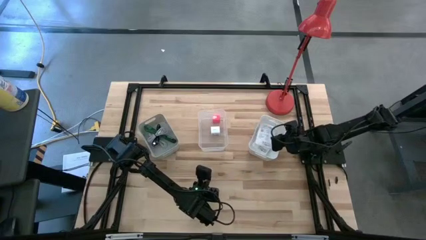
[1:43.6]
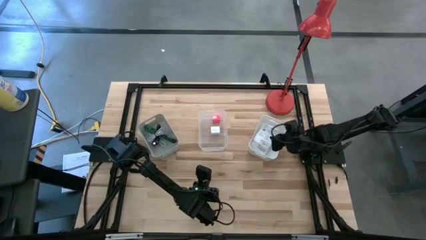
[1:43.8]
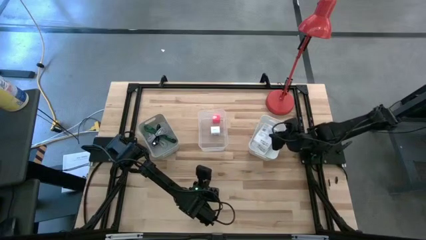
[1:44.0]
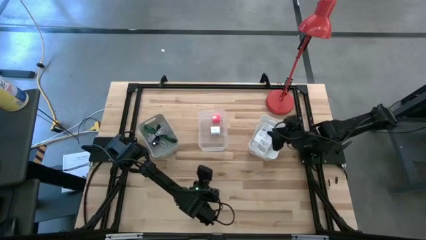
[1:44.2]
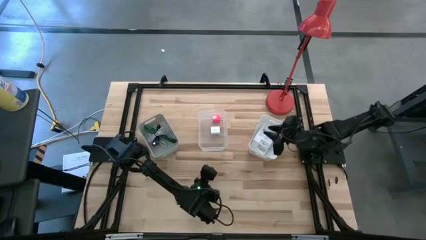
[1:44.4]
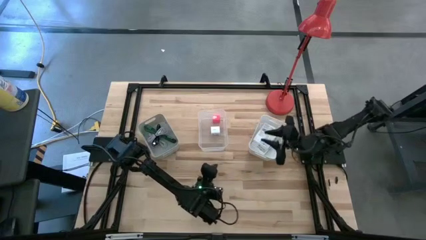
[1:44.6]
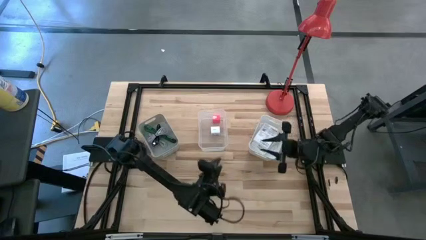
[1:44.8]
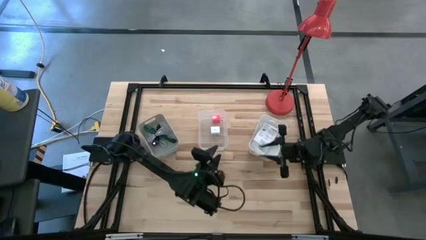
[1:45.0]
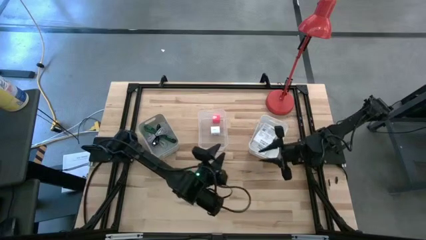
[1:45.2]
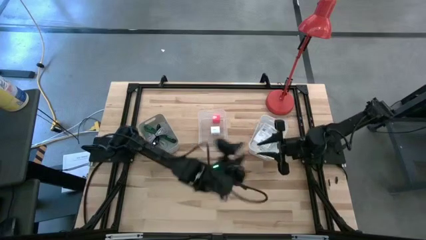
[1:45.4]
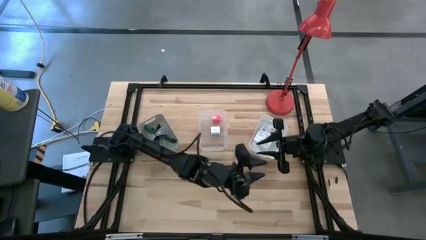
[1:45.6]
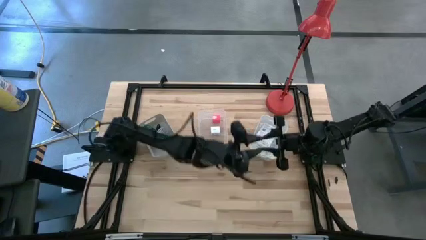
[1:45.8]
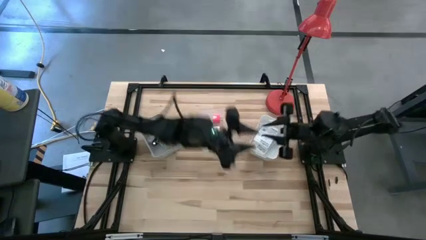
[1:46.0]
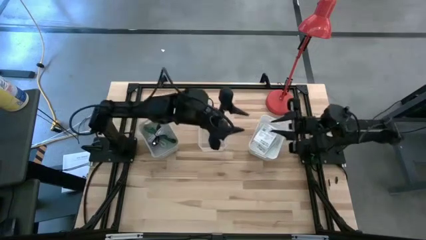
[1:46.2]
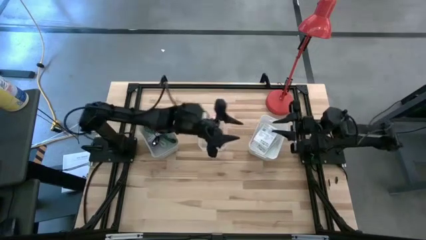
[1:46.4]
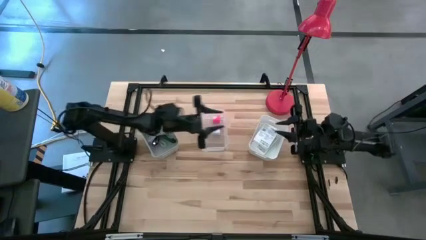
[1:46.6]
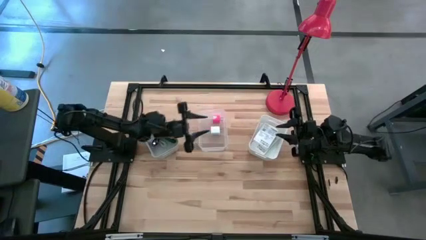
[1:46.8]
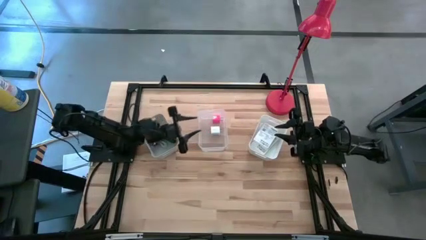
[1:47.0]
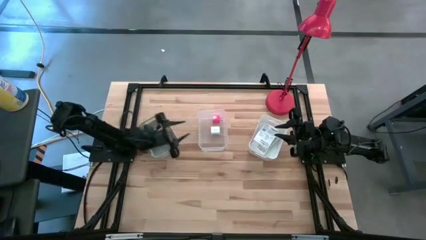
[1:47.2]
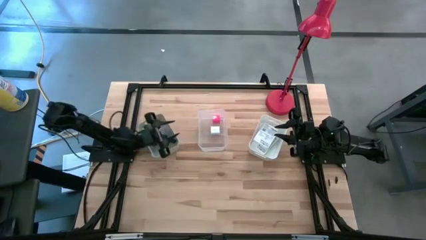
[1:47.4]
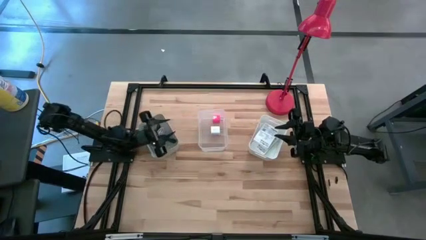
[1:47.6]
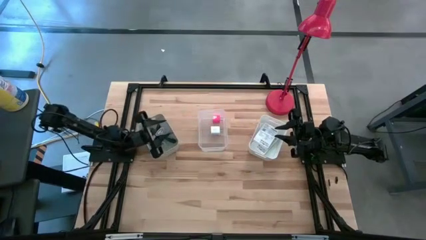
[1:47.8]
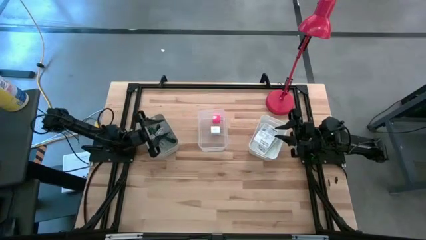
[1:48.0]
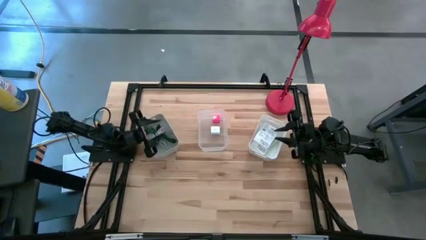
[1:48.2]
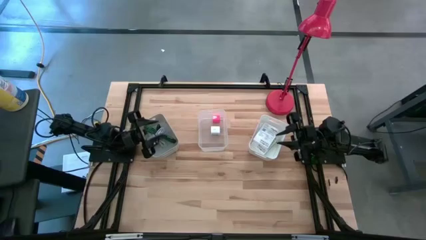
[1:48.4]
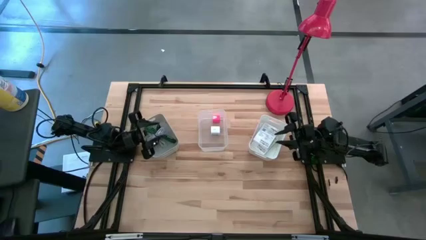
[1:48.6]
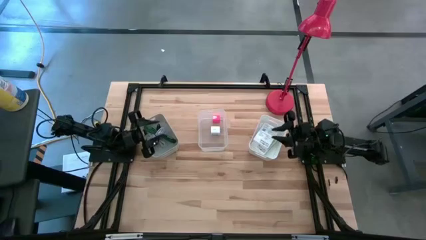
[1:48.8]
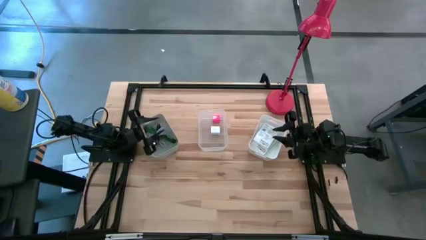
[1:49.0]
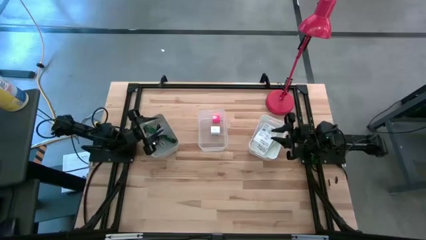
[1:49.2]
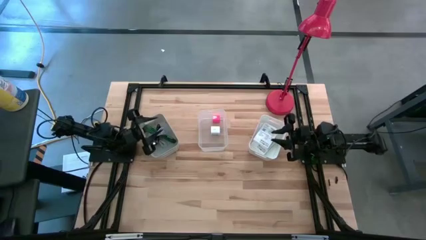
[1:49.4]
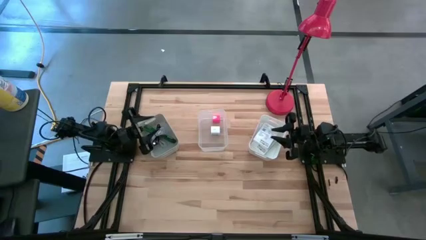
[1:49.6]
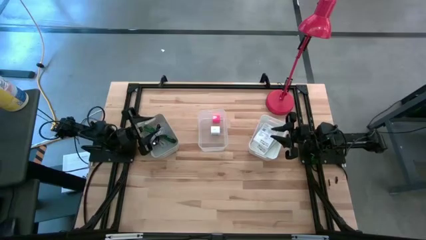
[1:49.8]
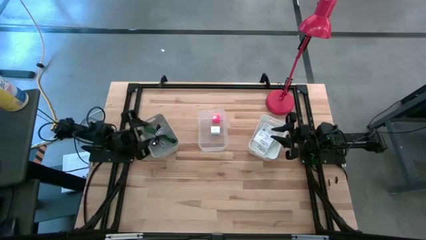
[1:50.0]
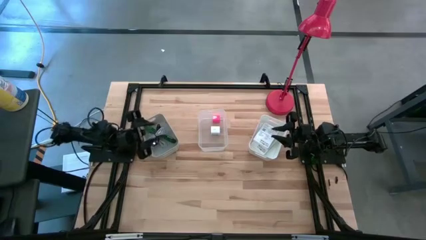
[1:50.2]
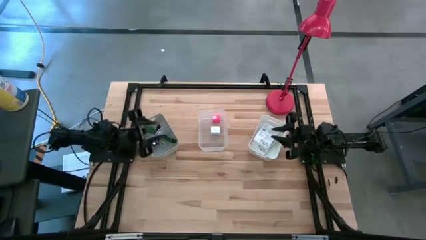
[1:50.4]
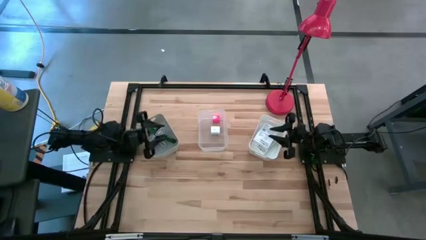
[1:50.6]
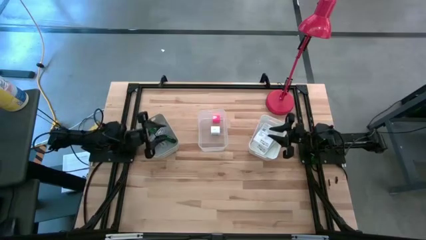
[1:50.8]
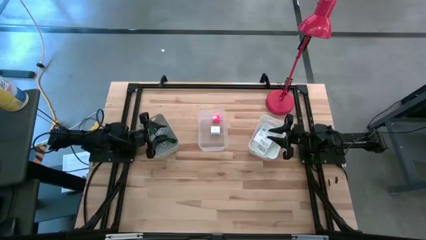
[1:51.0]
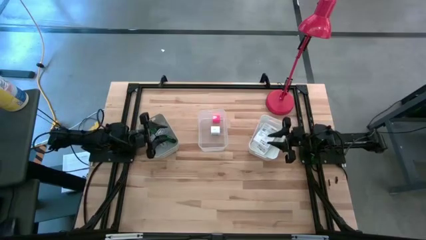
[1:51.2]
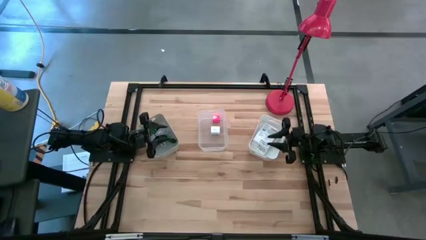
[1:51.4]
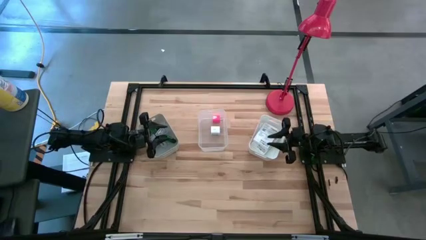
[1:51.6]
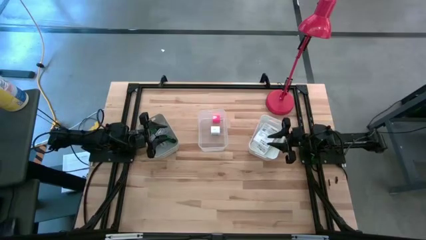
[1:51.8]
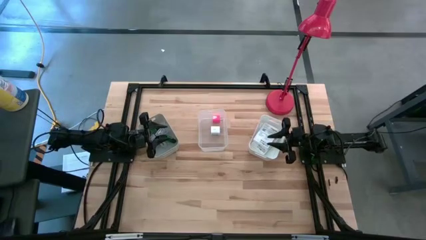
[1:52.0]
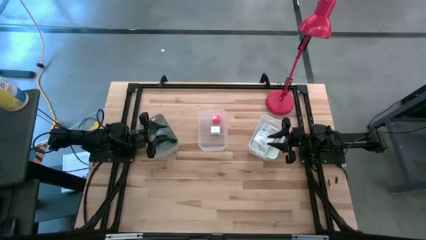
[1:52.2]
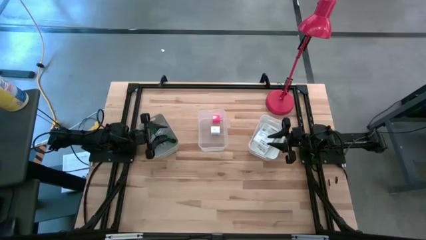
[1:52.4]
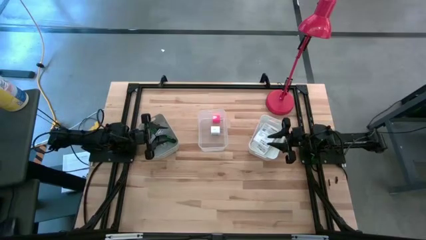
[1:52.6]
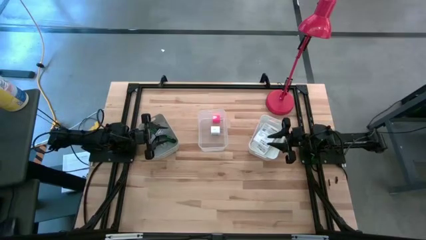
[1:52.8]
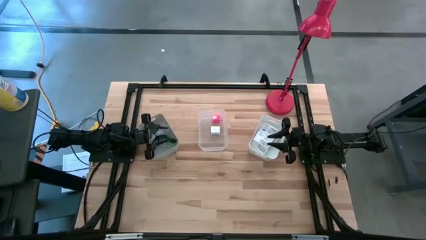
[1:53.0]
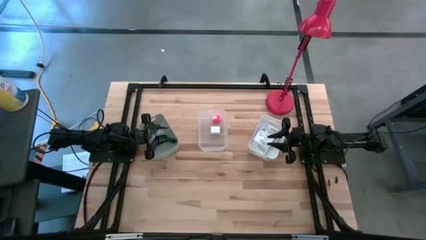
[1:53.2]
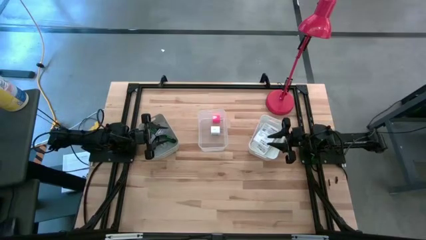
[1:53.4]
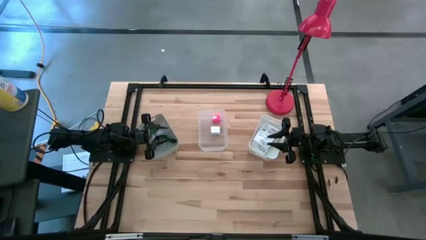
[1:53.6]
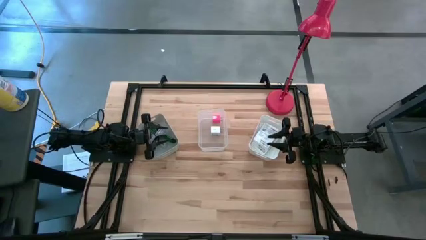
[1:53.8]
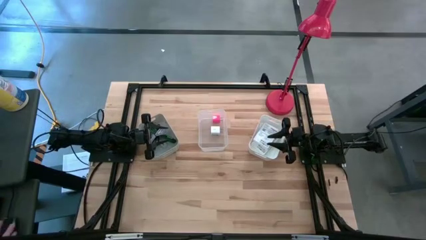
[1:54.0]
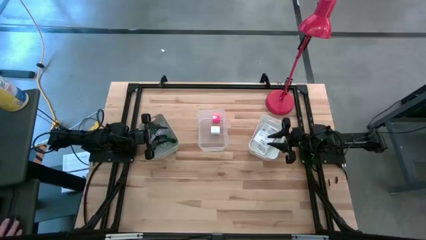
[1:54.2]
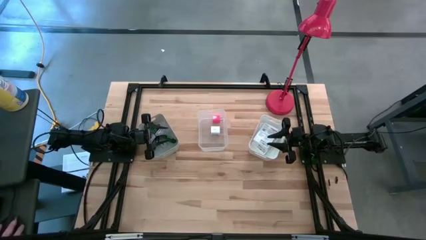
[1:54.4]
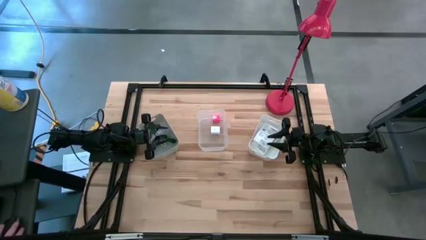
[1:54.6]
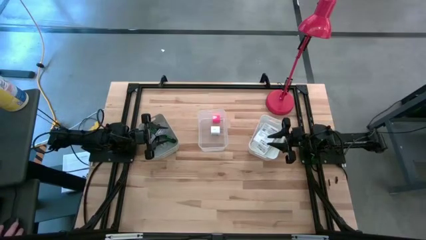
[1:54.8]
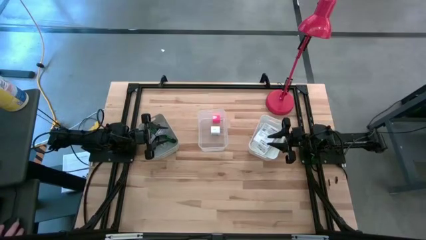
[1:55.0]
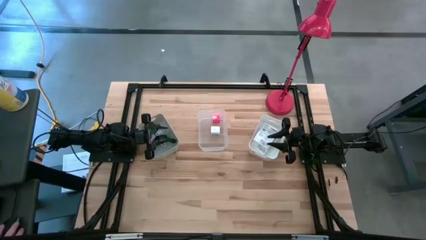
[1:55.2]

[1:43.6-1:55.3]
Task: Pick and place items into bin
Return to Home Position

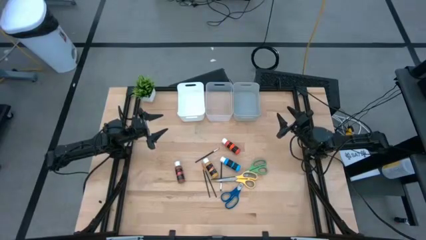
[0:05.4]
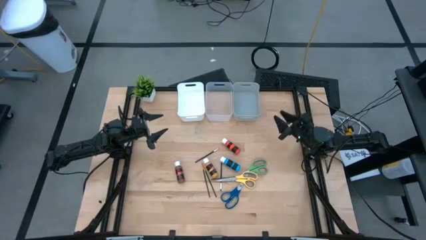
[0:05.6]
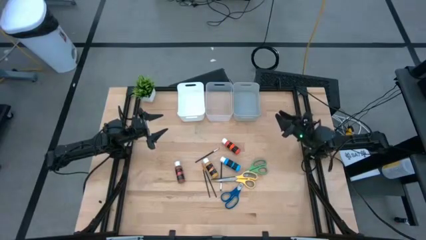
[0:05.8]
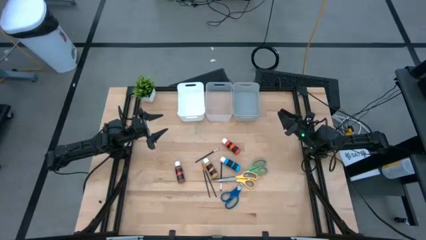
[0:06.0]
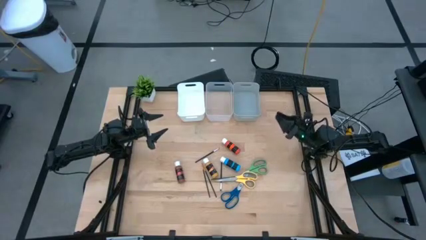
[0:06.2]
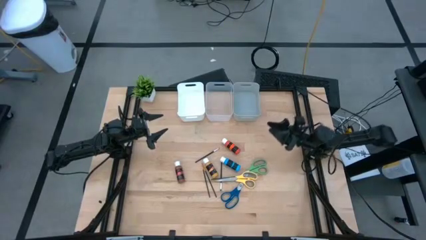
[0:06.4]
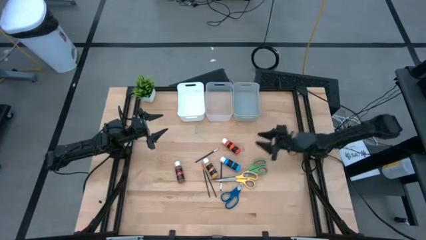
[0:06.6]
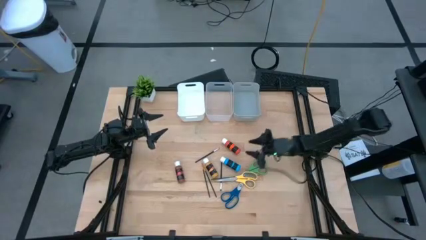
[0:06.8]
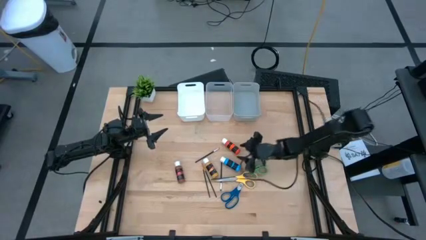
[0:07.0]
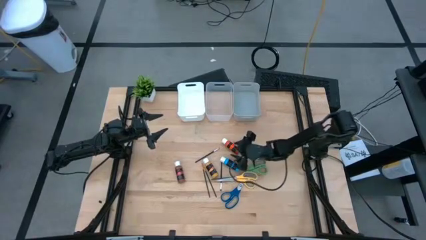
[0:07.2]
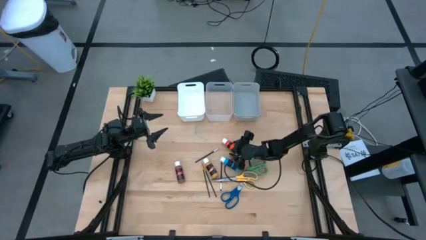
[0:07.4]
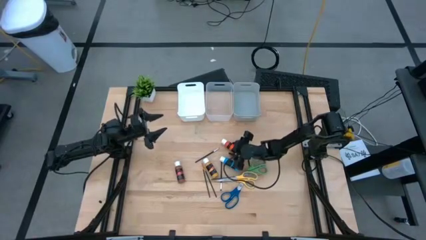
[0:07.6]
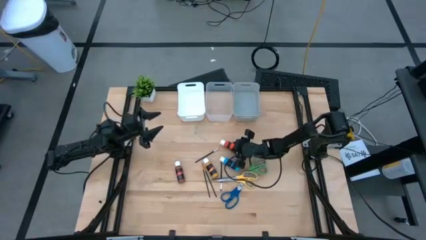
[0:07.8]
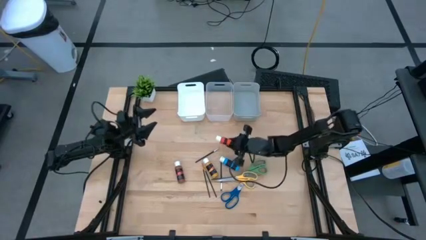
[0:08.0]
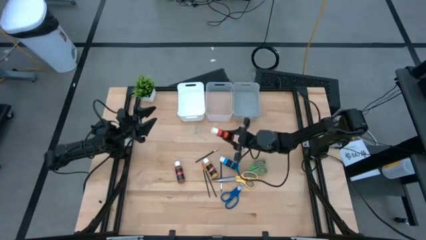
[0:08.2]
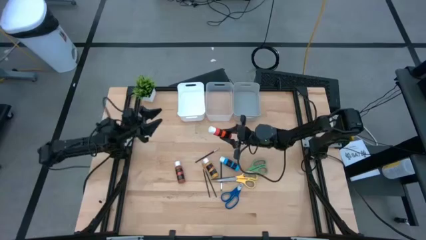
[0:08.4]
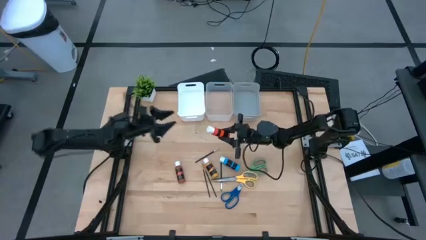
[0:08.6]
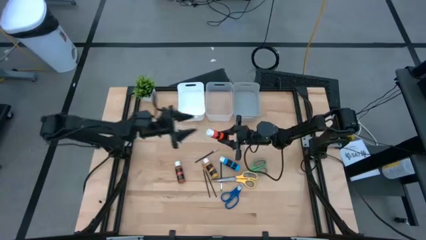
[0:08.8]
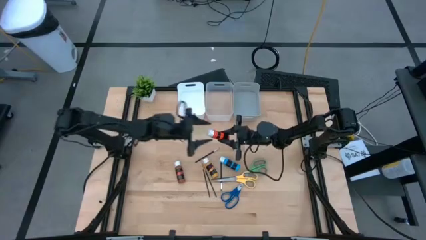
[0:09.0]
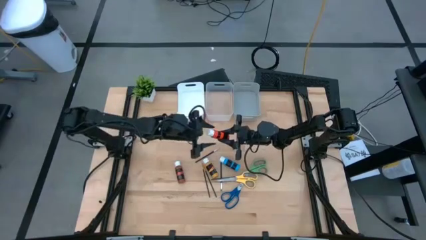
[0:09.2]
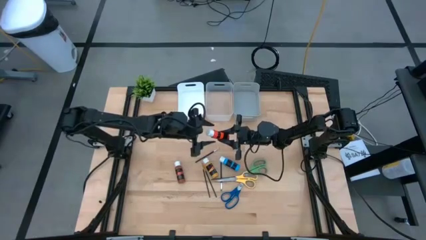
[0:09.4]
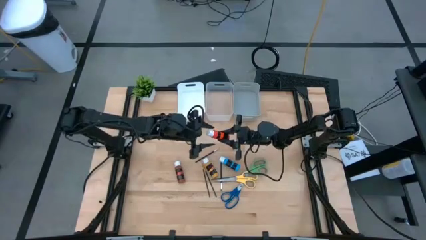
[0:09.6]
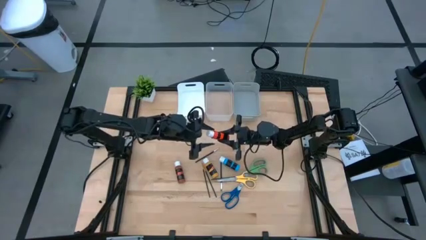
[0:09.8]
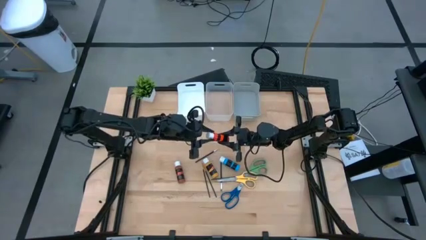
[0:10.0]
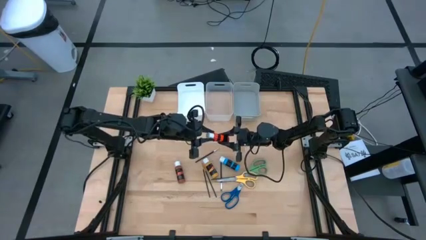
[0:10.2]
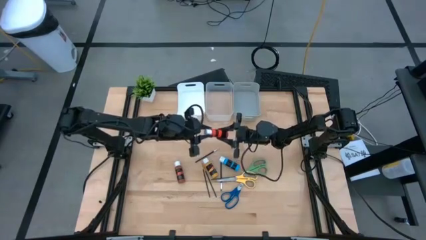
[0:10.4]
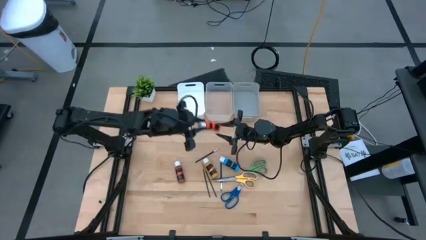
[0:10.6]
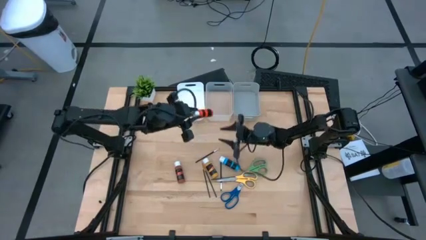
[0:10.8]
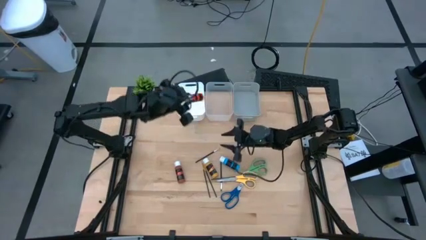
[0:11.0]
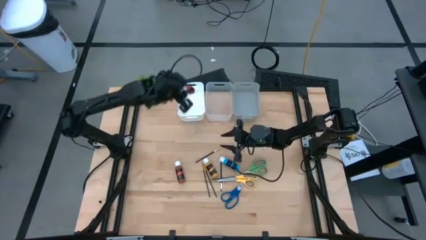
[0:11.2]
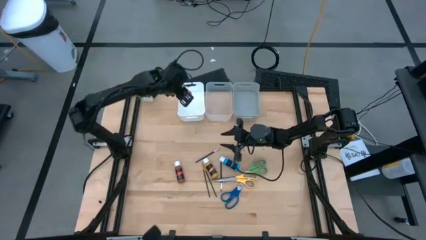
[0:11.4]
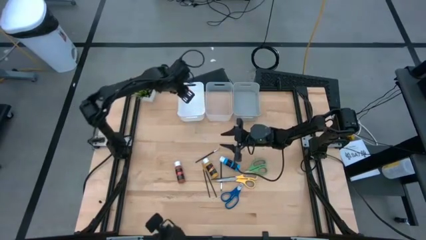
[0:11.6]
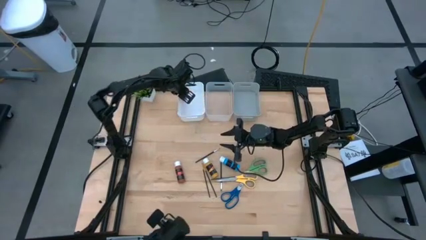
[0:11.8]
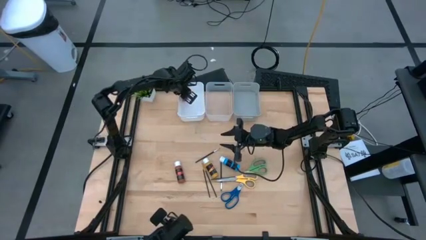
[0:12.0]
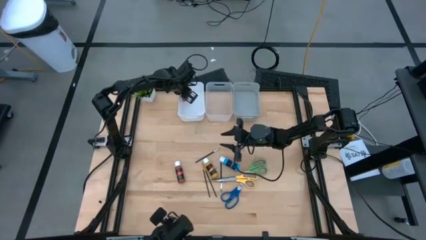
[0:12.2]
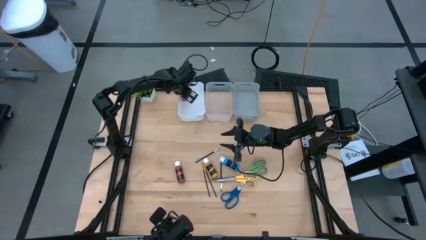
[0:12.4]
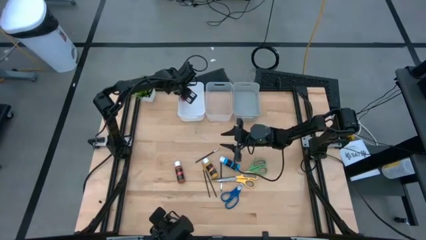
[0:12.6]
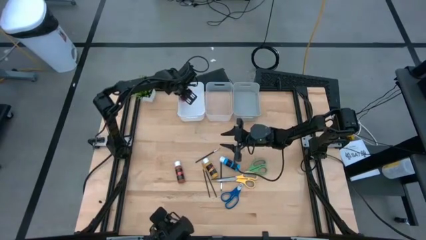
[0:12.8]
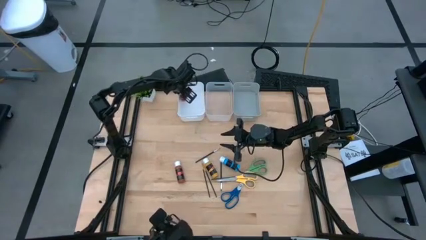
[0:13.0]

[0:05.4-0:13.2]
Task: Pick & Place Paint Supplies
Put the orange paint bottle into the white bin
